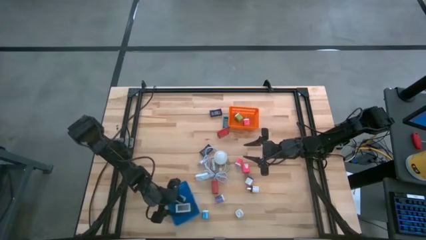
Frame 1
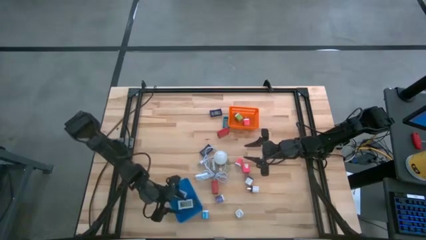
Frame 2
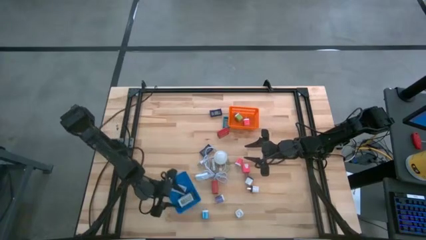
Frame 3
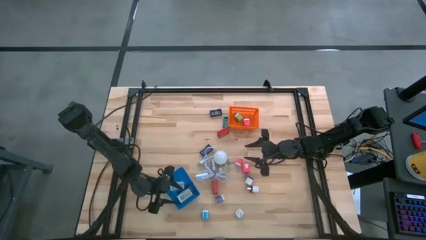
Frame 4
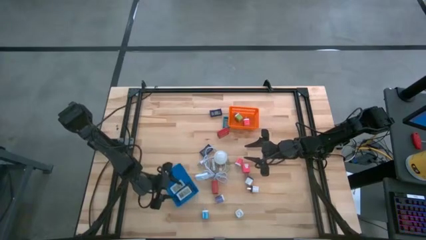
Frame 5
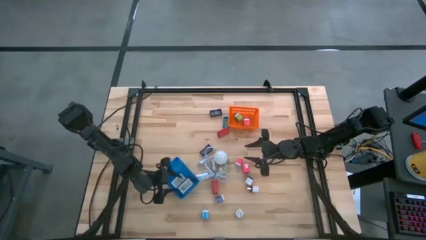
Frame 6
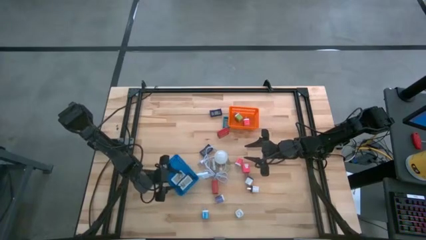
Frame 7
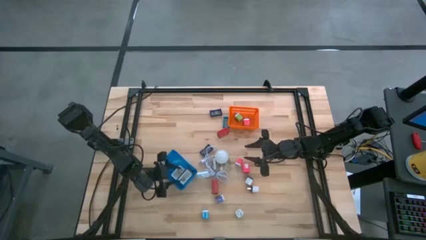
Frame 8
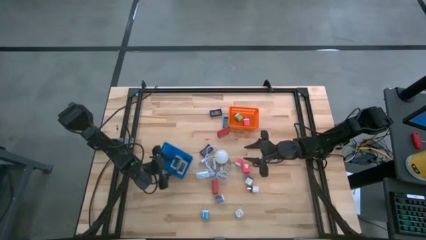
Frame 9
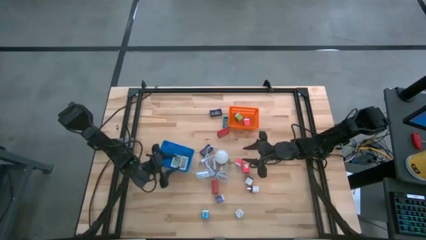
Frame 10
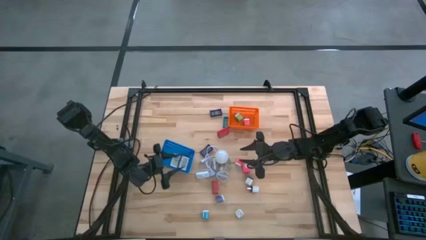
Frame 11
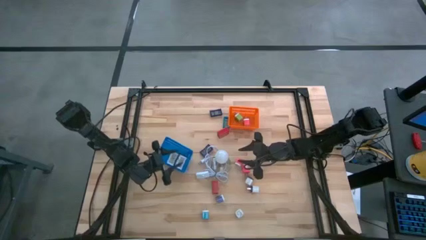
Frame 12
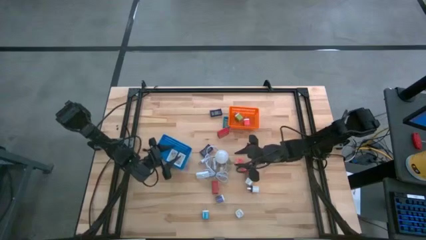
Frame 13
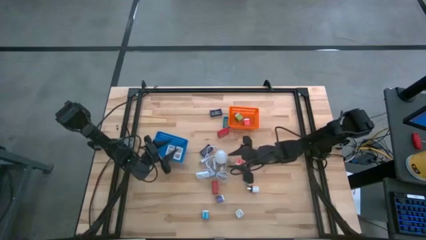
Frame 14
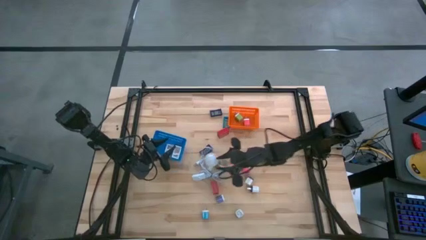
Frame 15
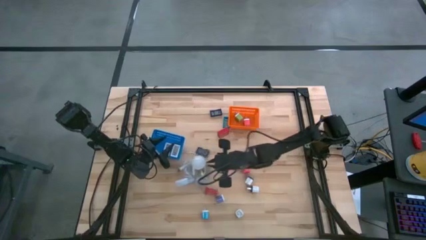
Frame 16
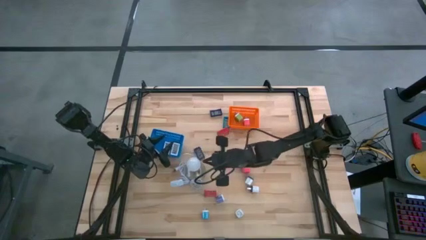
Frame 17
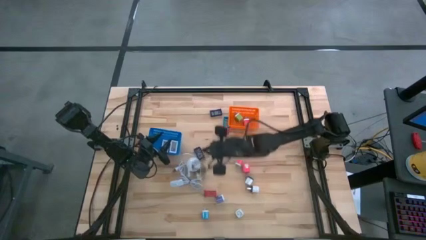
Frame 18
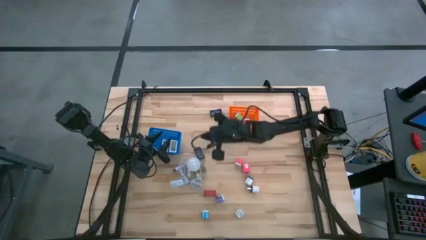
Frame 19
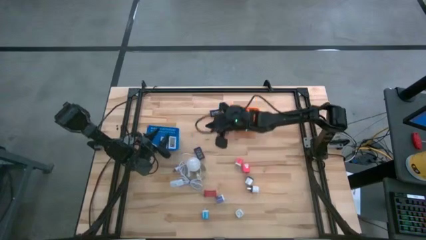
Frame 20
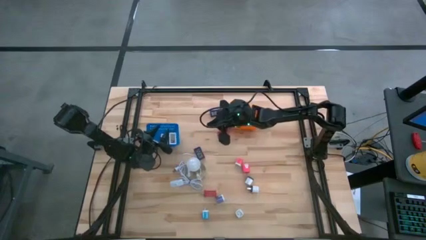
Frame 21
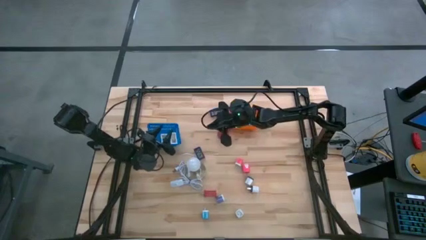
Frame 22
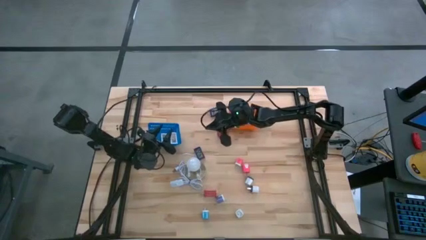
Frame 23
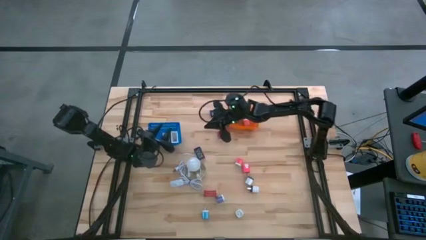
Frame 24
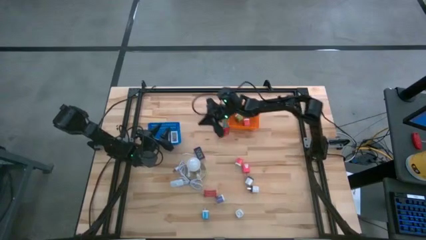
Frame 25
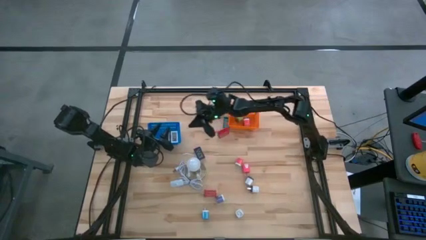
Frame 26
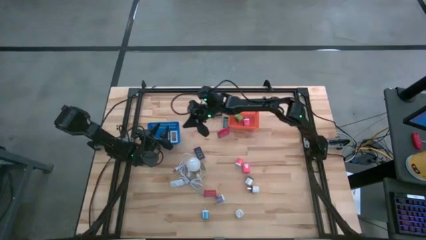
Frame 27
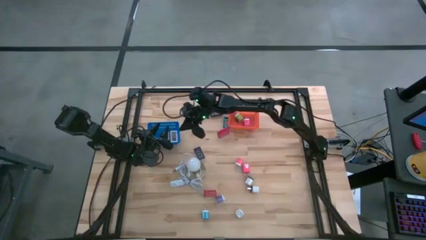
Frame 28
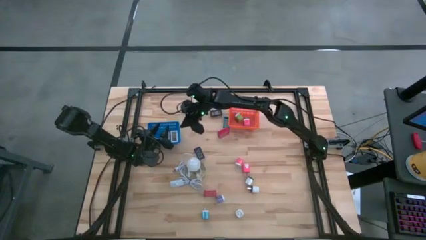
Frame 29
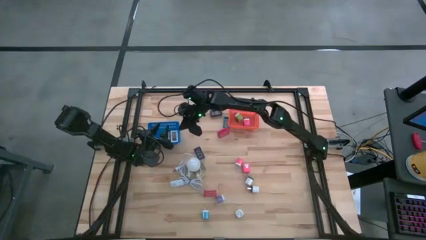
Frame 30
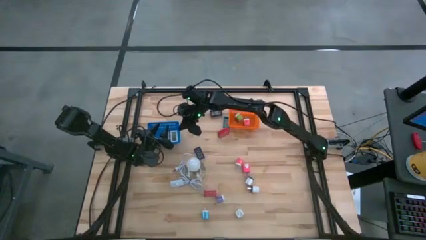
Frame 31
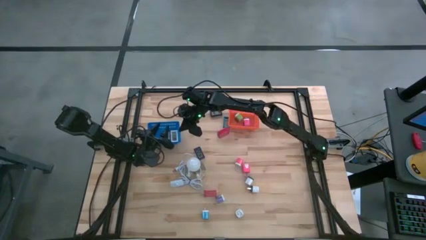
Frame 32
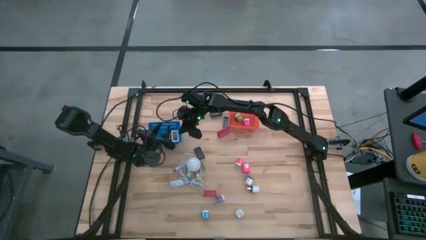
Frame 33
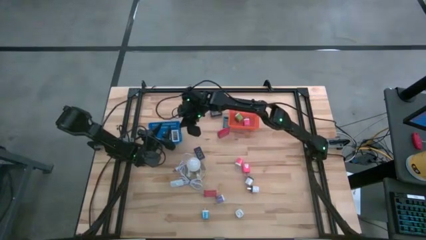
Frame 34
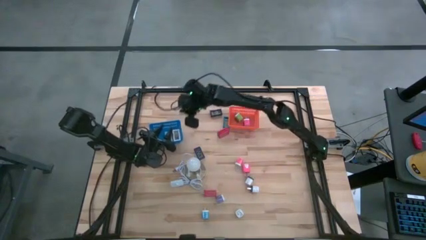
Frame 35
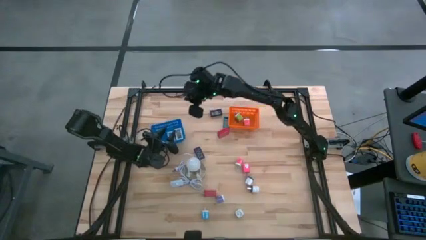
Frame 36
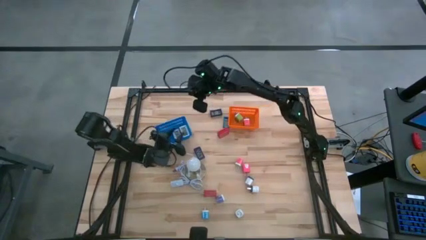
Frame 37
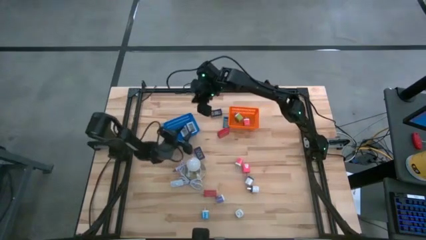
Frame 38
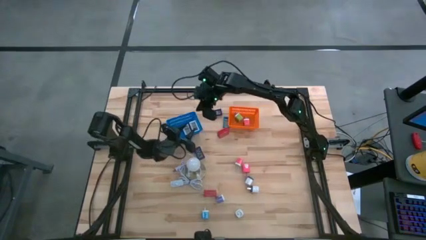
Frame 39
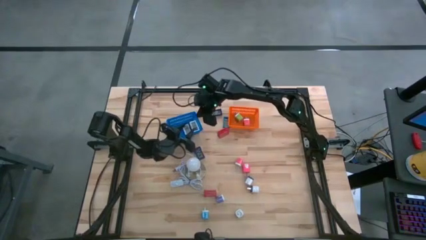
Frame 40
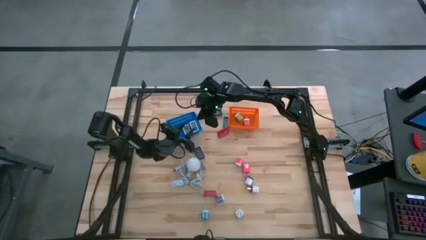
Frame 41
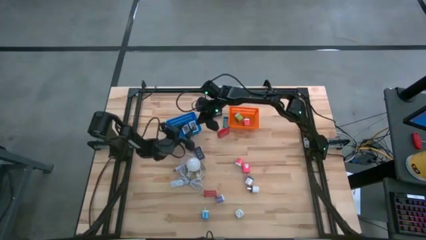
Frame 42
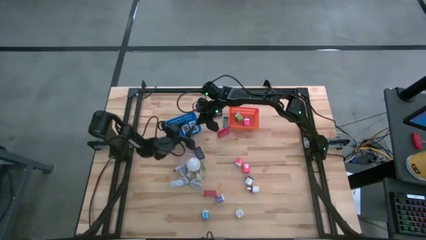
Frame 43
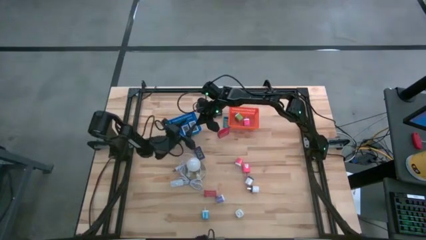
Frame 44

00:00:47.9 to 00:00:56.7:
Task: Pick & Place Office items
Move the bottom left blue bin to the left side of the orange bin

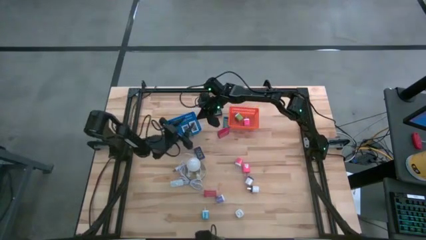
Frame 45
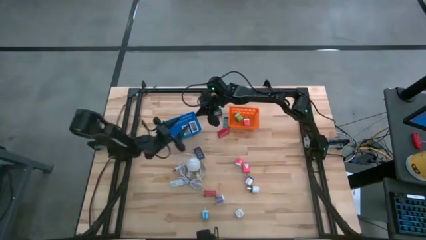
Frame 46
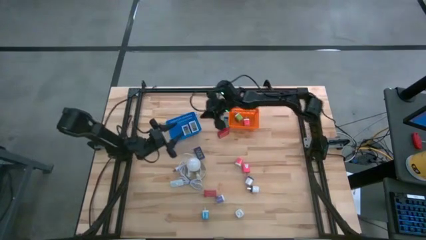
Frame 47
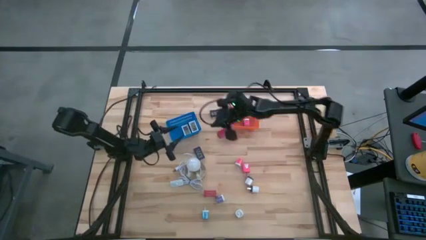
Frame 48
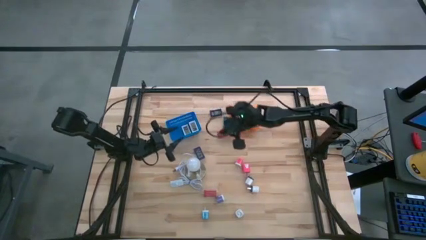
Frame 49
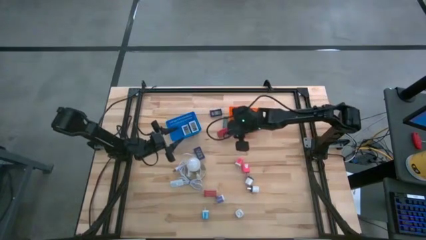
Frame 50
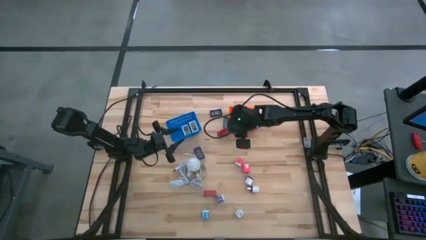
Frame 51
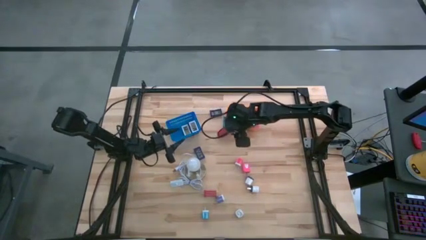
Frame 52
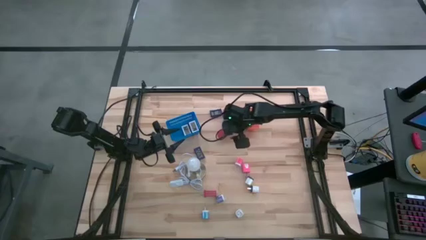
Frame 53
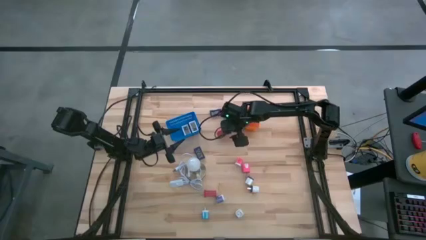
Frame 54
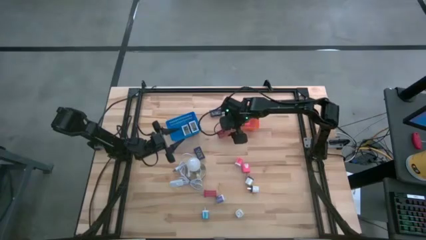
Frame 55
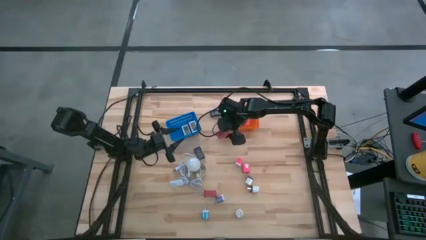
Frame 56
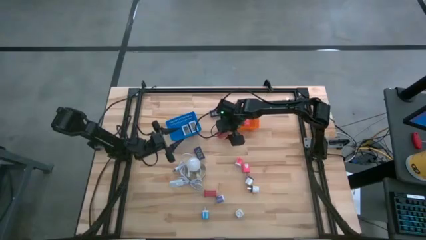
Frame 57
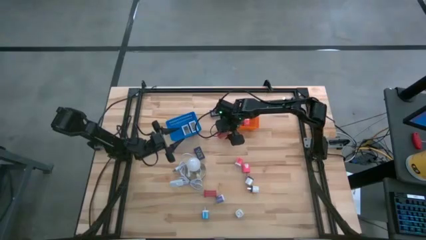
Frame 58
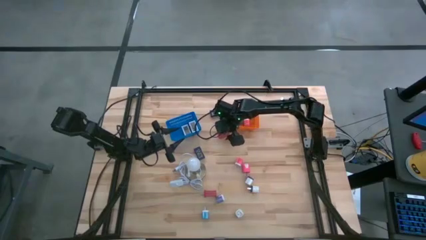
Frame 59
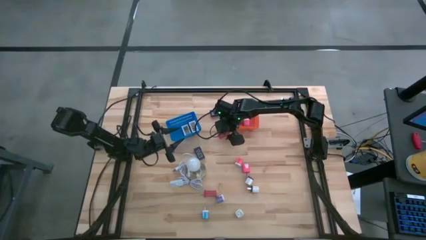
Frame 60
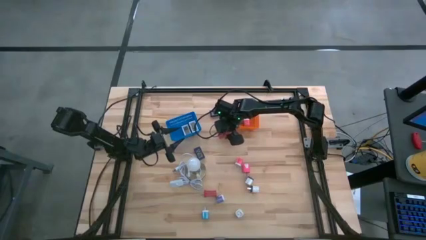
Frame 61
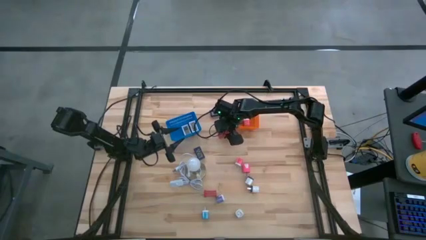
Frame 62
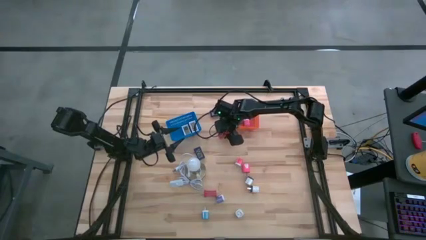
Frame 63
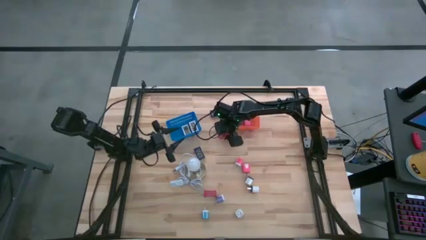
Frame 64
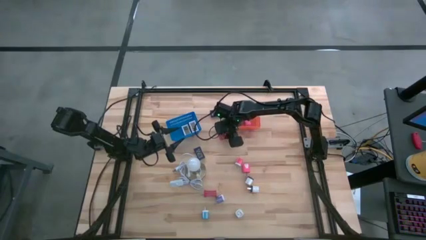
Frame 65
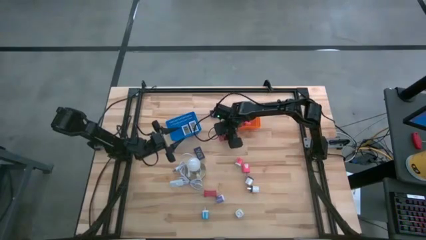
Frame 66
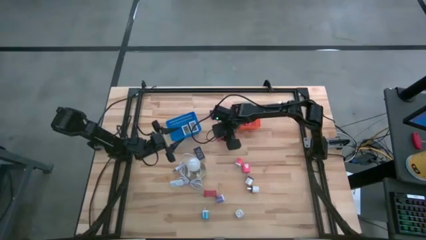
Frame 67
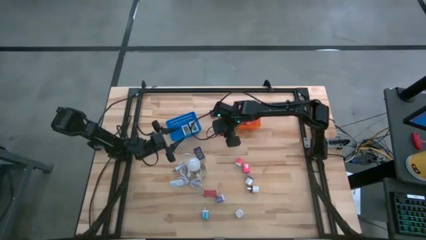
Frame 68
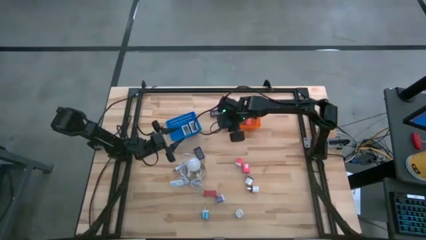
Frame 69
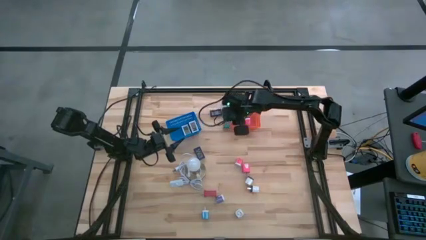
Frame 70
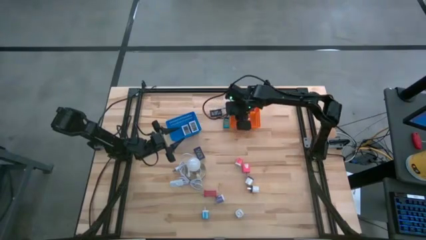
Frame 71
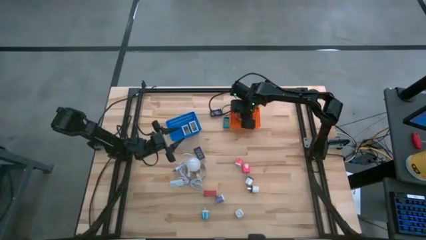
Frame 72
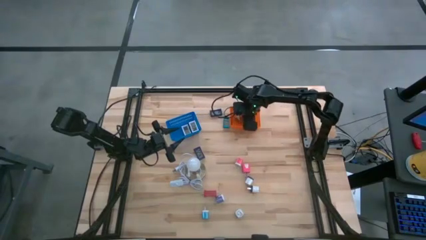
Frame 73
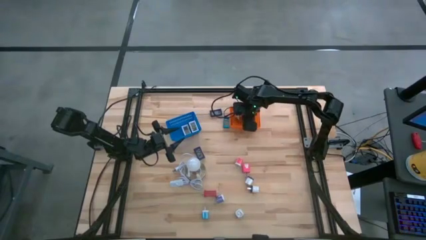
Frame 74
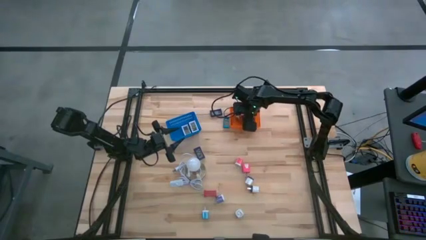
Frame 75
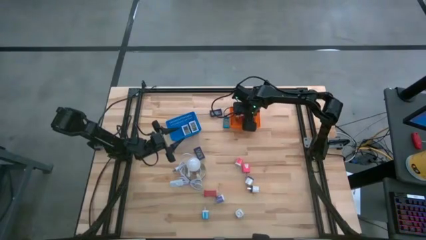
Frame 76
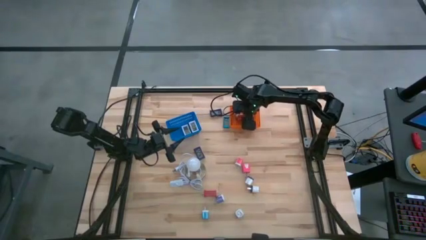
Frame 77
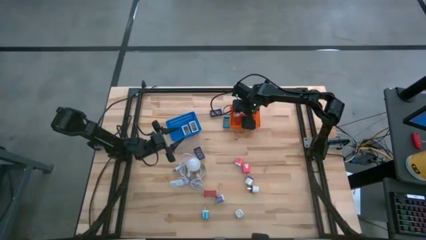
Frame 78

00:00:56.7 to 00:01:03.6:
Put the top red charger adapter into the orange bin

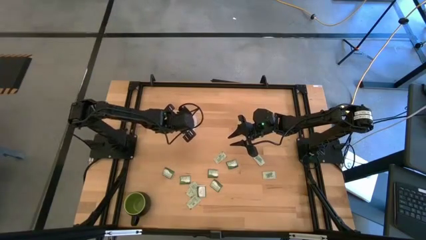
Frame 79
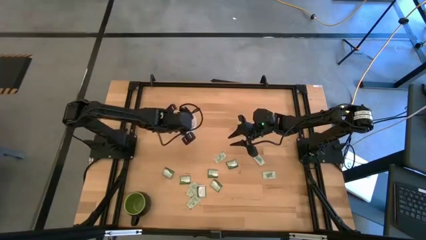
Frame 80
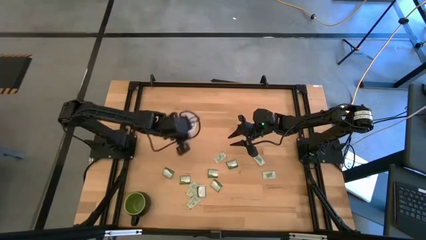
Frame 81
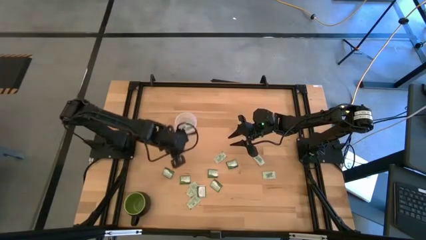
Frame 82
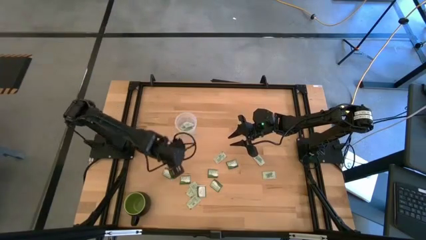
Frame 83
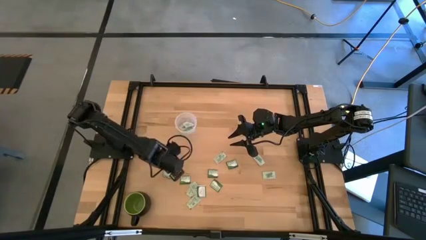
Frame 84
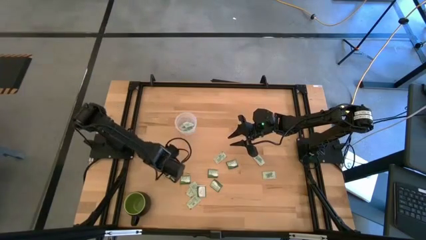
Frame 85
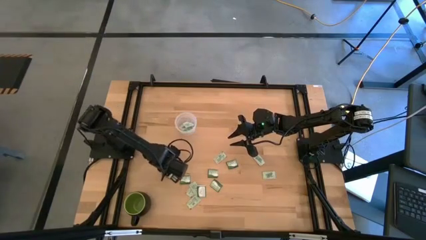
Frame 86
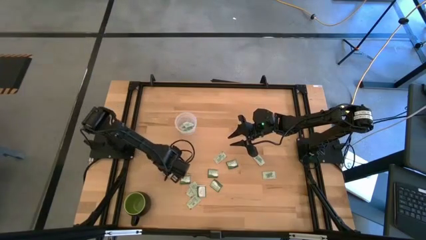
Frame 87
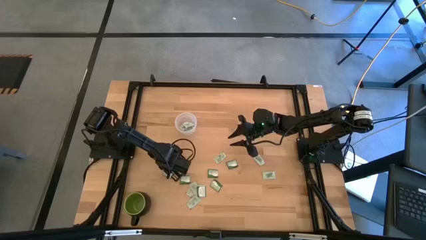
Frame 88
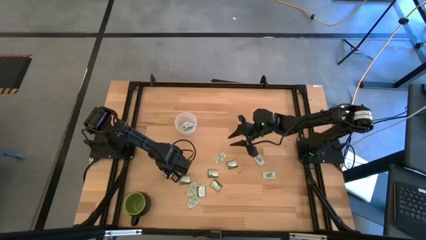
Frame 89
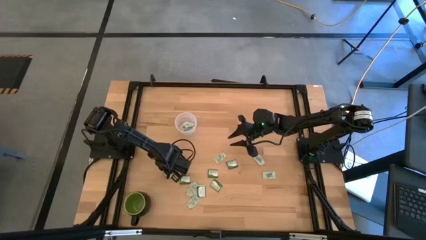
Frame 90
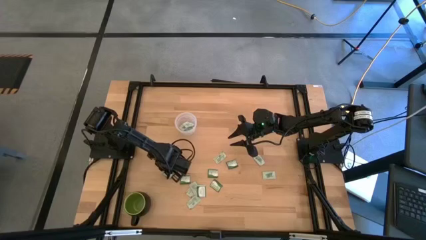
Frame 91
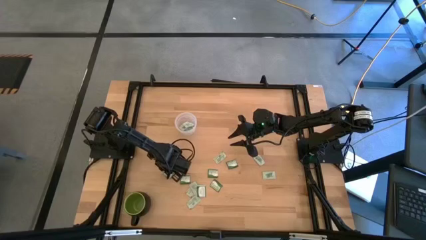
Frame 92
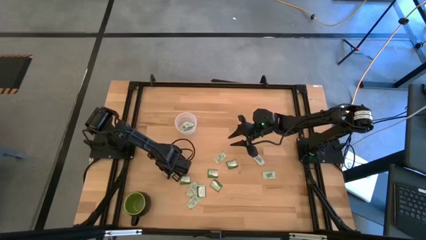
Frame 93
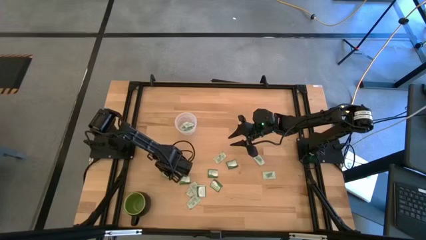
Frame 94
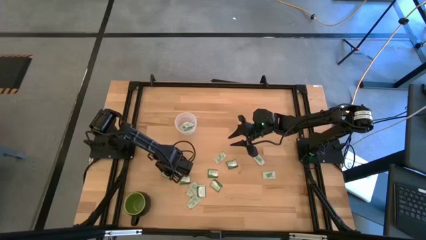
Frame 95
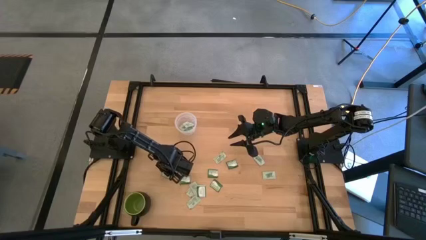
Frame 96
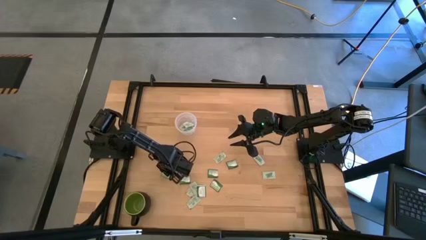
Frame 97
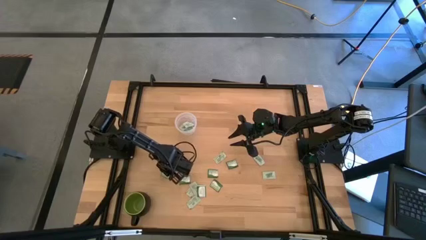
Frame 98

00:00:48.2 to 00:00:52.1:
Task: Pick and place Stevia / Truvia into bins
Put the green stevia packet into the transparent container
